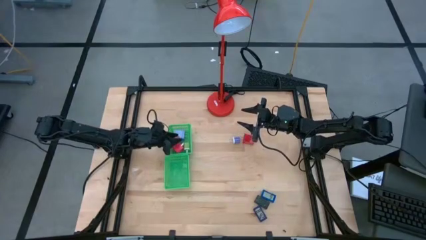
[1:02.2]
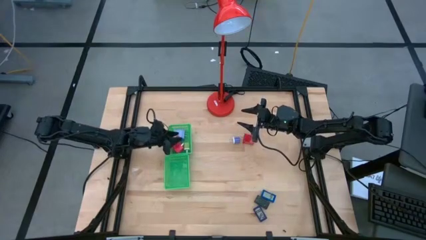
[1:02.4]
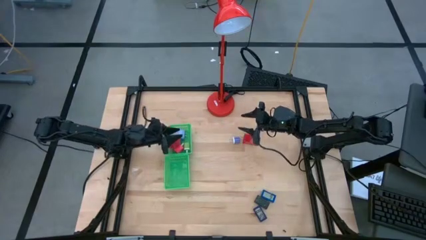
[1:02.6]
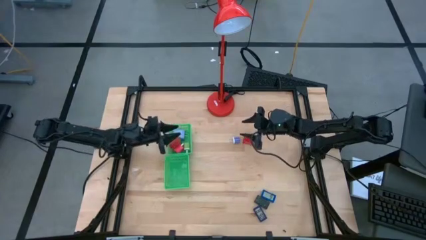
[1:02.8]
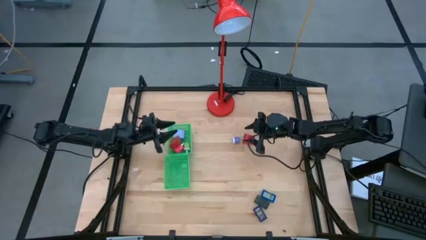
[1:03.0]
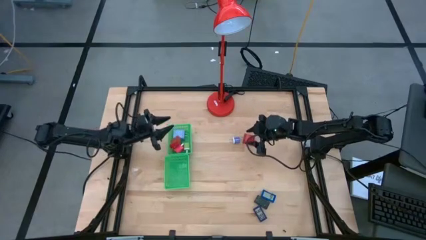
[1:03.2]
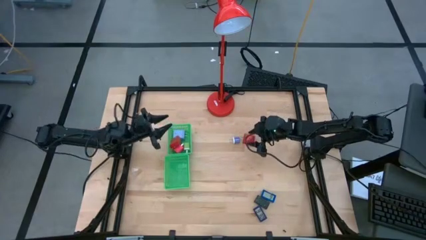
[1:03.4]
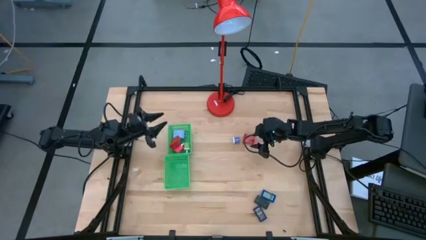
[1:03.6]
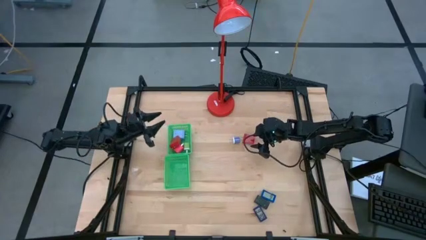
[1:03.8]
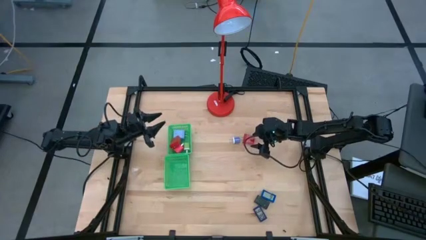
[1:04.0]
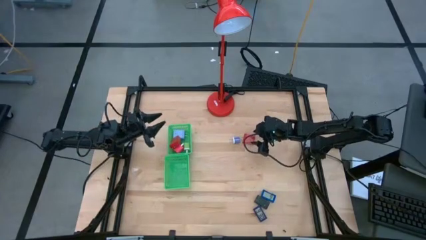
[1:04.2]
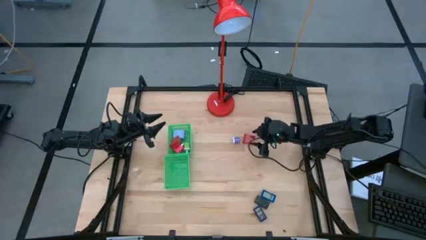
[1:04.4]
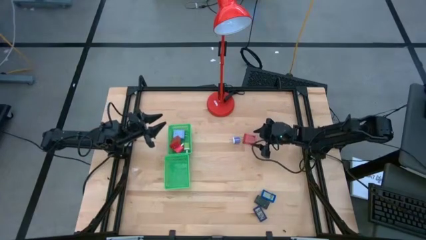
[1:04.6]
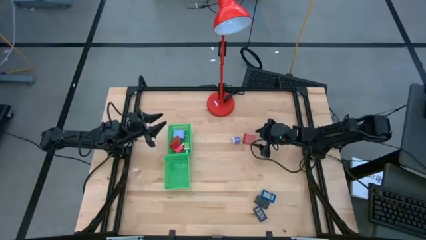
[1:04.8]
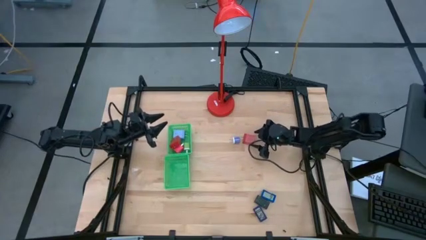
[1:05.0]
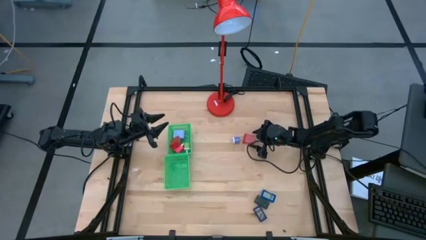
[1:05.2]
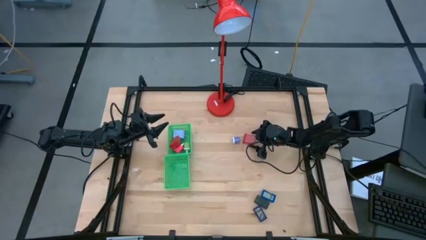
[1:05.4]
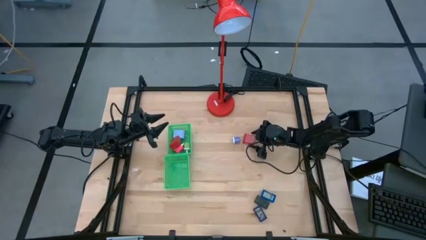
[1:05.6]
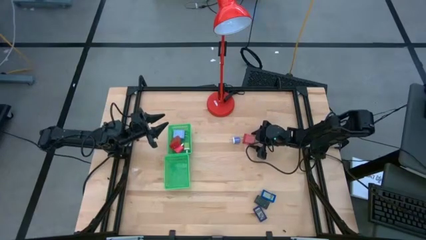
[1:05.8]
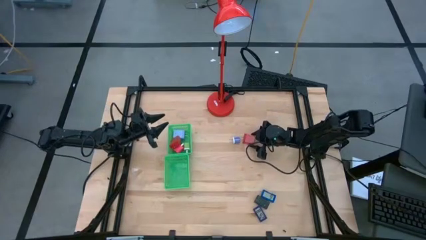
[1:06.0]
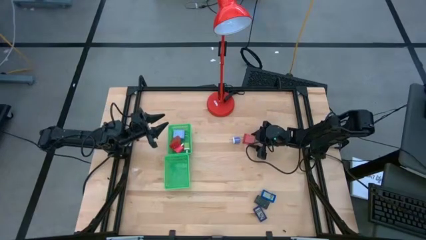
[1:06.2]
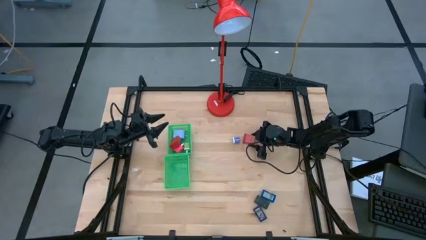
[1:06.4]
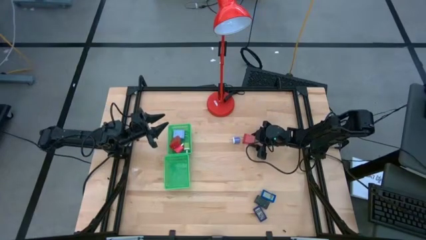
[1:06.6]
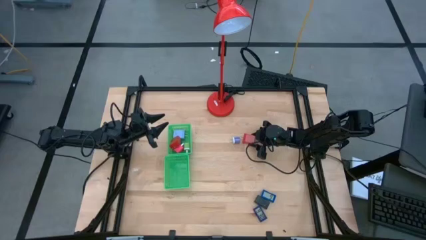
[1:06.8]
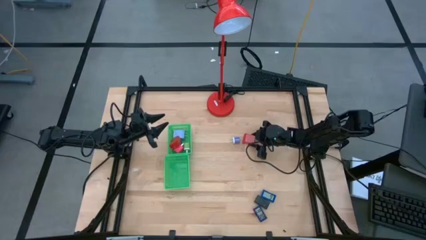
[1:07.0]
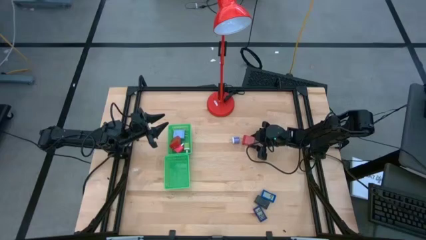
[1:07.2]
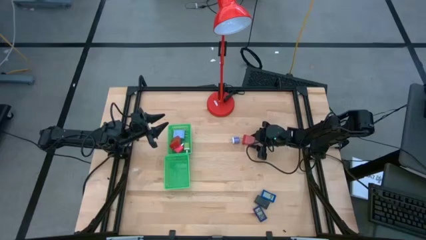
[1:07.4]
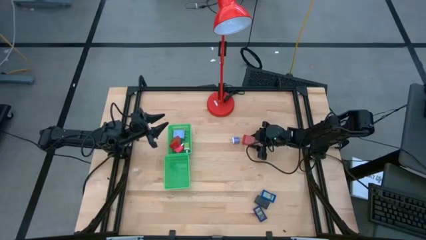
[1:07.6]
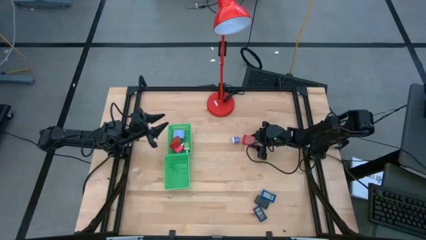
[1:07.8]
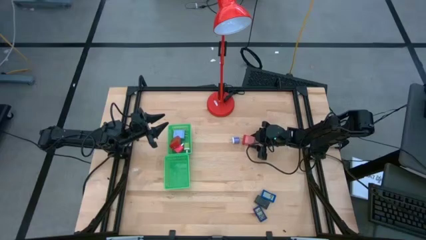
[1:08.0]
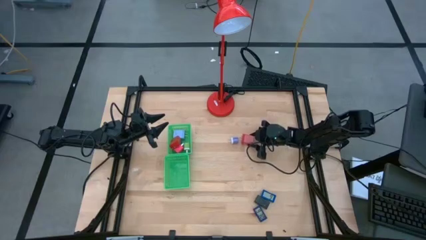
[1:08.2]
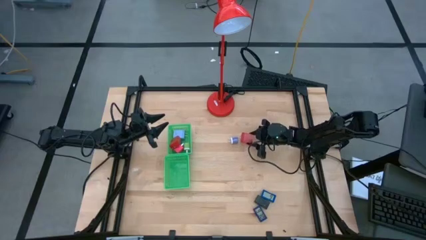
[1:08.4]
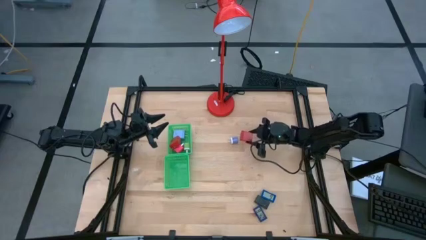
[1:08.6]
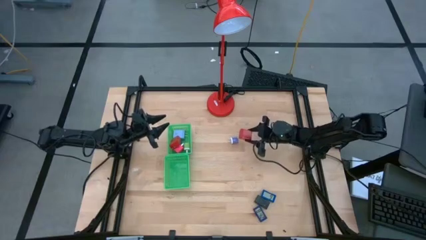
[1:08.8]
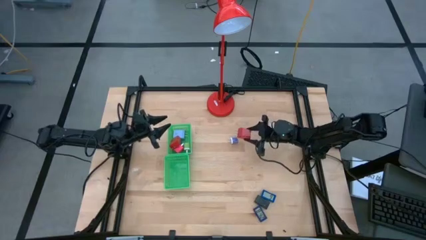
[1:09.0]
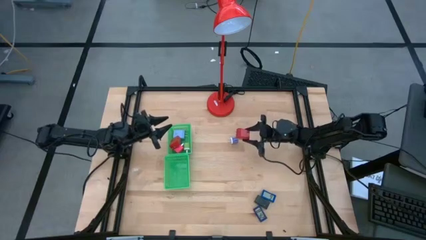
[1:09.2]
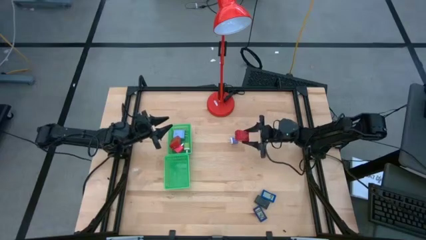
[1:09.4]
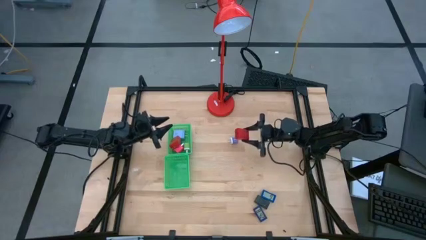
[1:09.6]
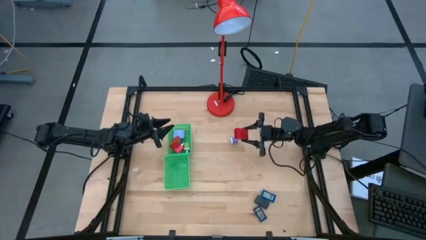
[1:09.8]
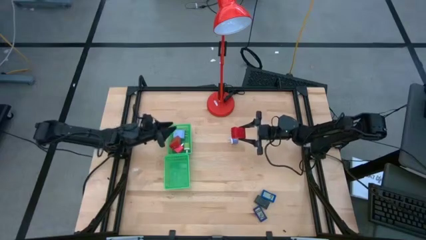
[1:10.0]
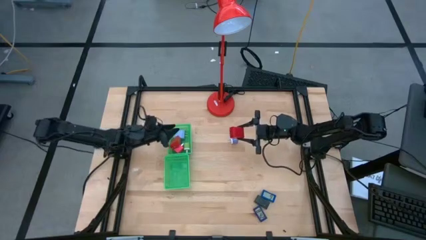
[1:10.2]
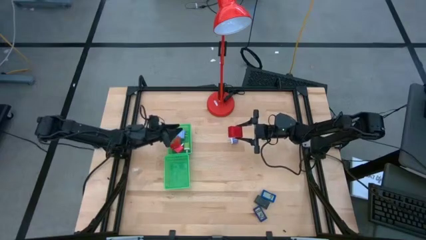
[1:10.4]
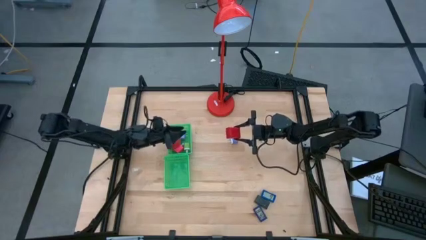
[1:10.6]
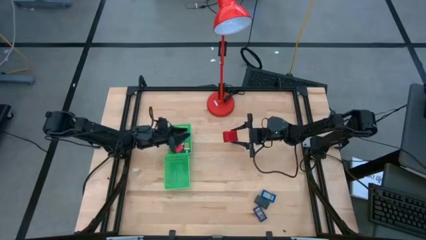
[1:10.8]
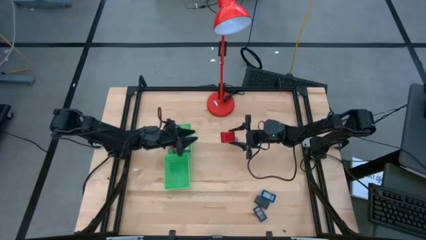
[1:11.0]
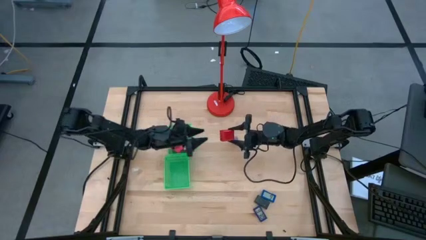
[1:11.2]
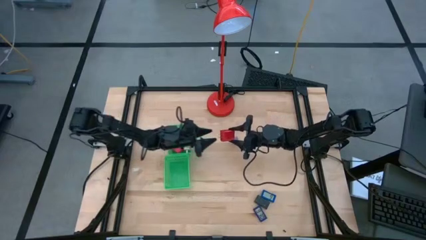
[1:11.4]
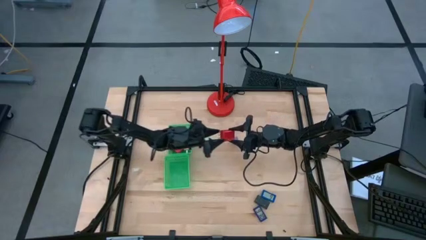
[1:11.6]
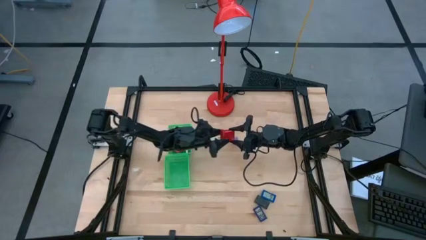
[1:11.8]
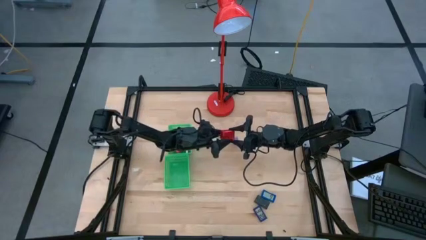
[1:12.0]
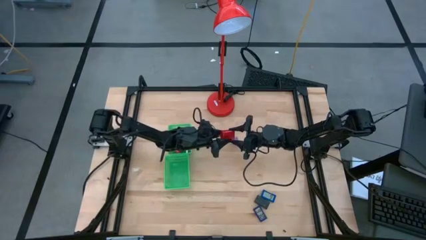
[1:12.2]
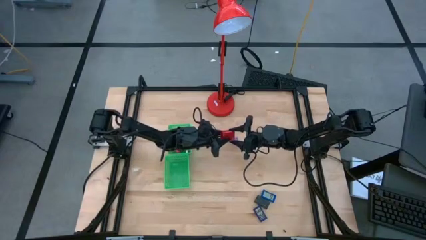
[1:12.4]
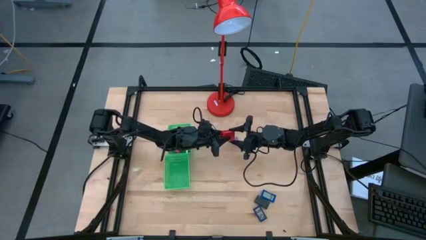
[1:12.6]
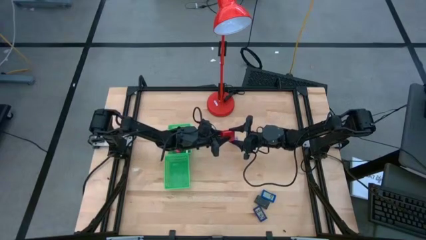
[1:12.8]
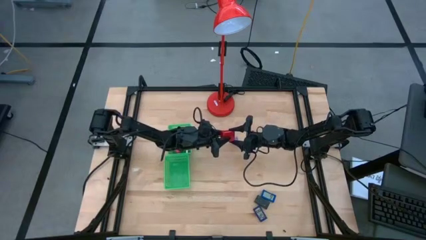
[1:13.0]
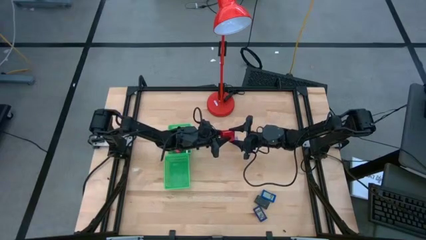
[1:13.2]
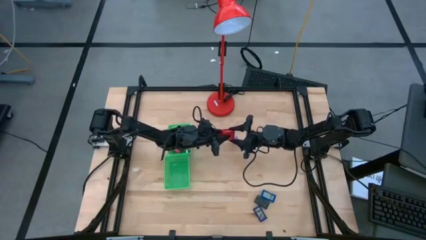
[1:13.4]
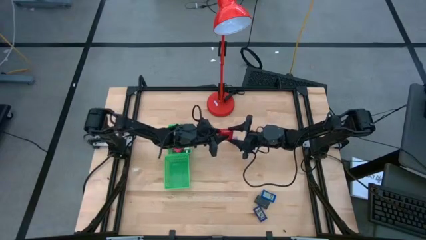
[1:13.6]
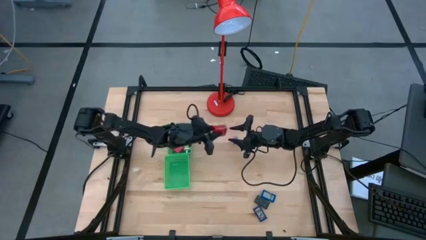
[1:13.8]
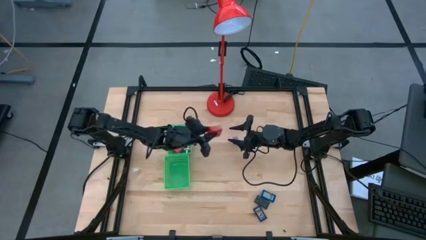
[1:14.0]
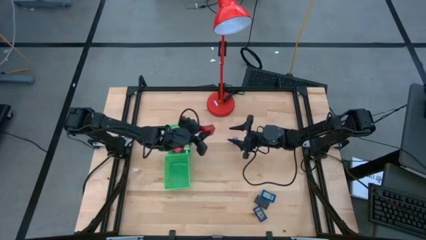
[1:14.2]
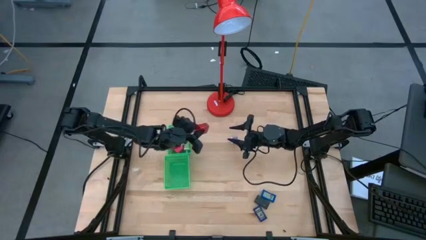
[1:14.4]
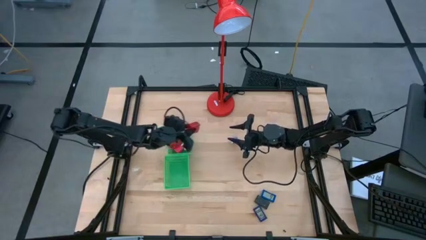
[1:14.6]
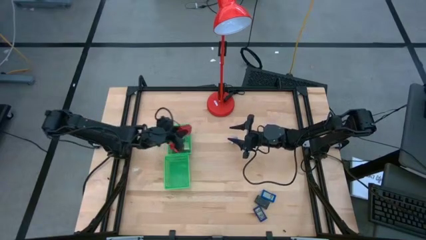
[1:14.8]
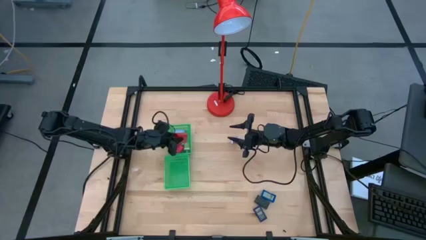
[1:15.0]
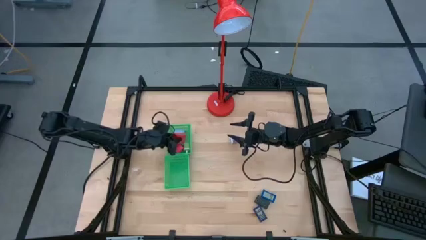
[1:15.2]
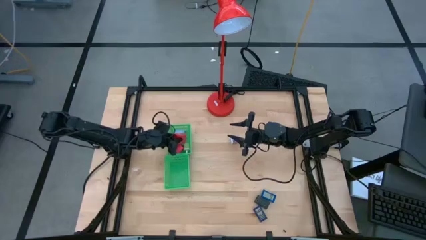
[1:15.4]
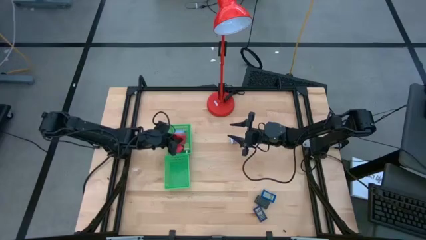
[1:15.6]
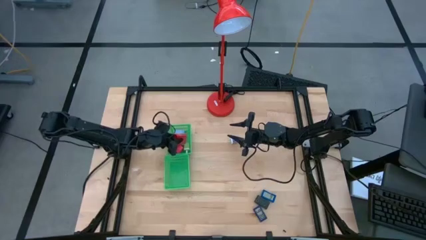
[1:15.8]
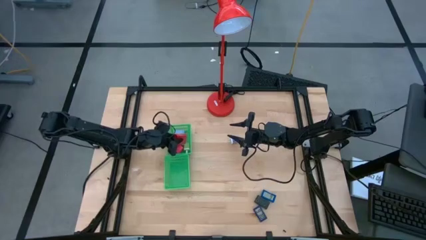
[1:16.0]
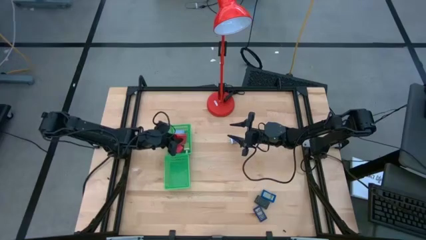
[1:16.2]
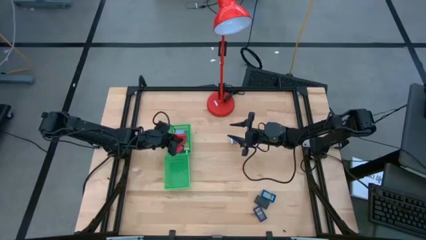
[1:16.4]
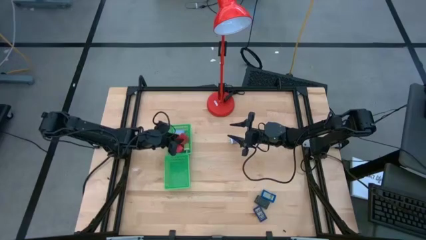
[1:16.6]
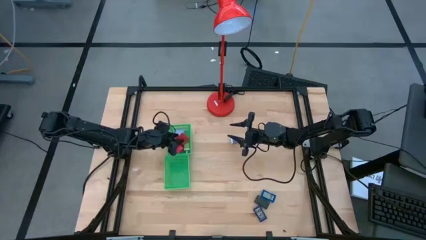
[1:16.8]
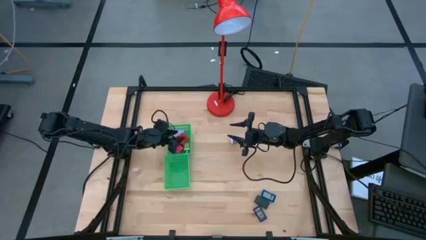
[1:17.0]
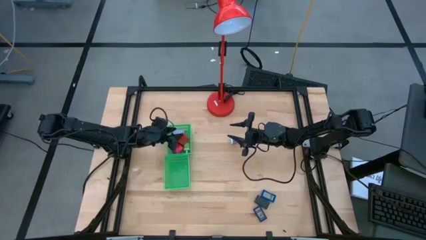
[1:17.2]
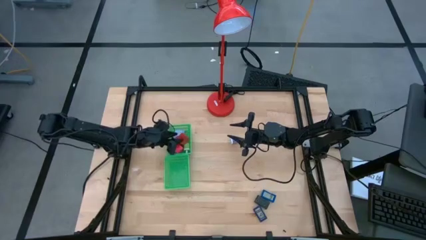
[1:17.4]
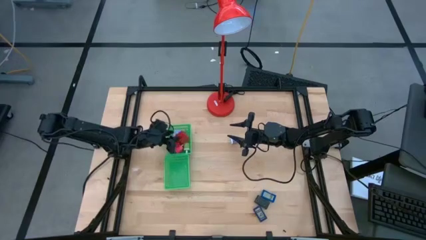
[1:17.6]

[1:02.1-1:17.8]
Task: Pick & Place Office items
Put the red charger adapter into the top green bin

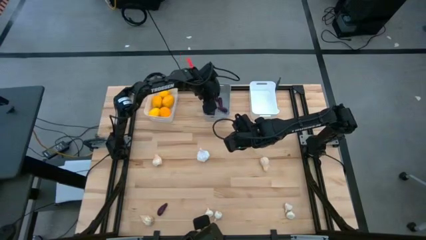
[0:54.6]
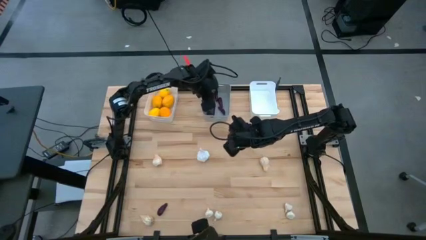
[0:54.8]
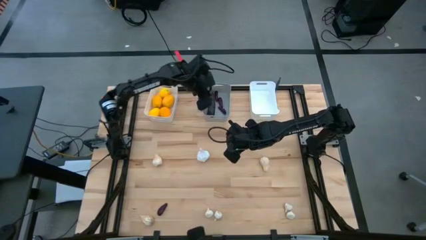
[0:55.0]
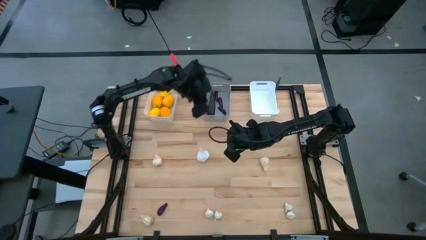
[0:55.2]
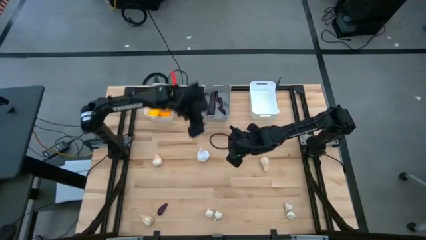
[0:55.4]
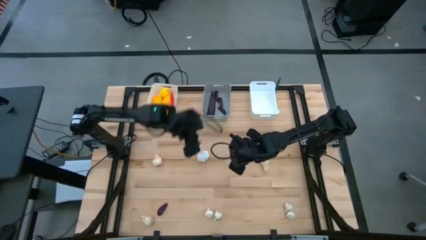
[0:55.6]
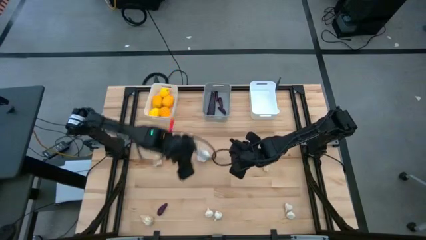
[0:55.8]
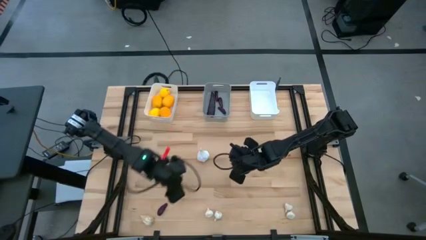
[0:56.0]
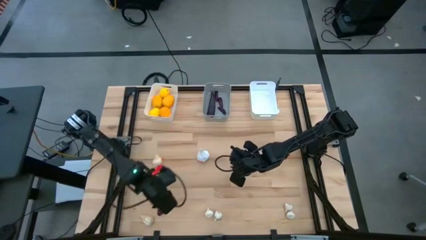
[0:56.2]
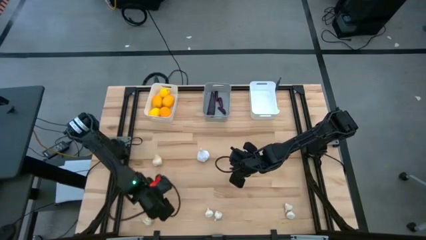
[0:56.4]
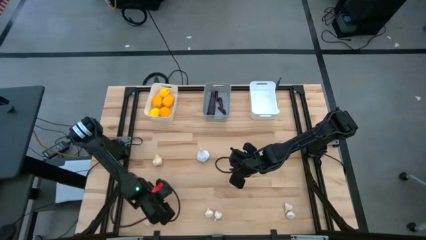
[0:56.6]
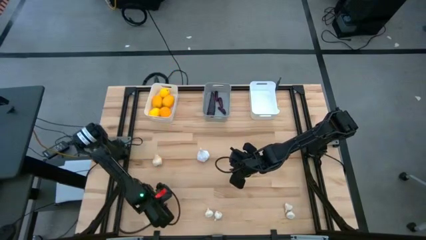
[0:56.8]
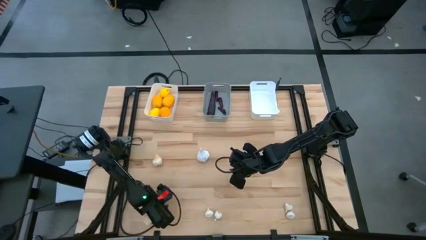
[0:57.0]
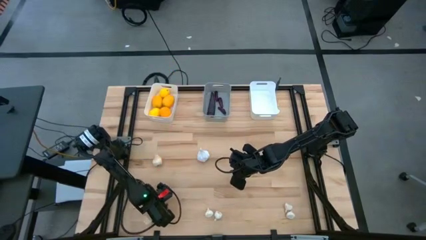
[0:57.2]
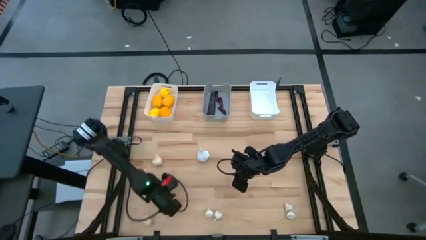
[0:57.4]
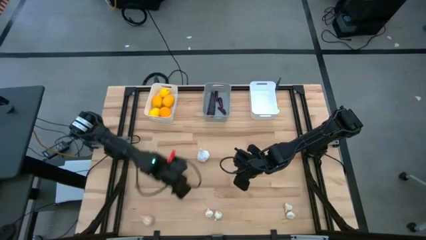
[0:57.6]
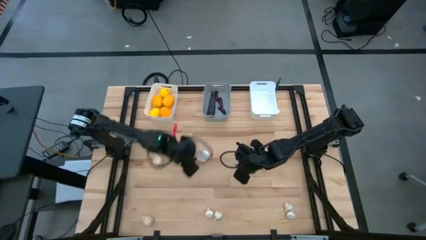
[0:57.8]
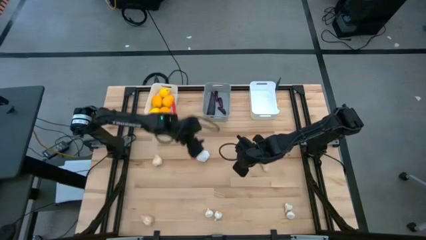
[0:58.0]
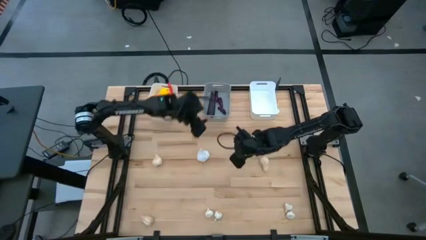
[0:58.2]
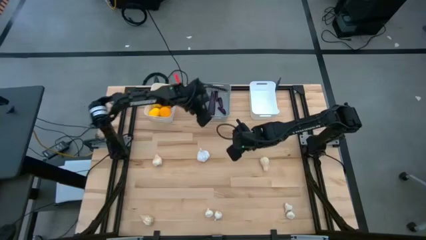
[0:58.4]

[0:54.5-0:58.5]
Task: Sort produce into baskets
Put the eggplant into the gray bin
